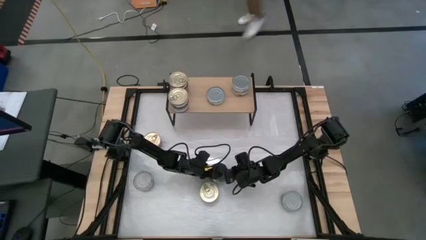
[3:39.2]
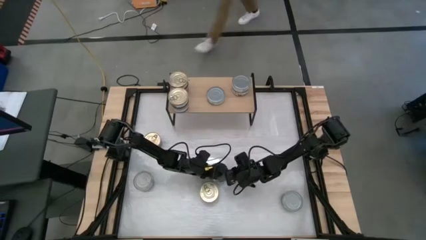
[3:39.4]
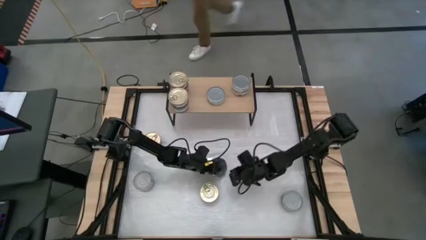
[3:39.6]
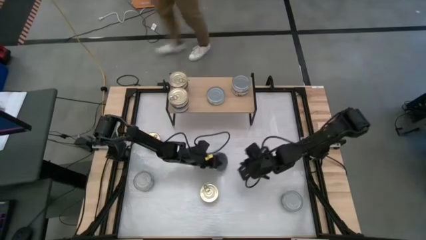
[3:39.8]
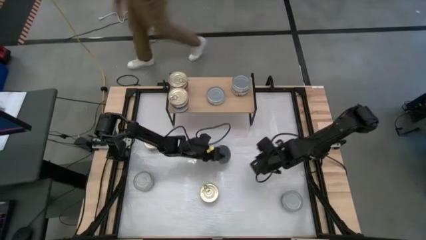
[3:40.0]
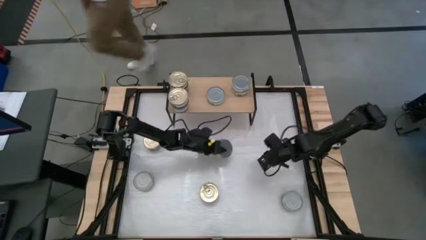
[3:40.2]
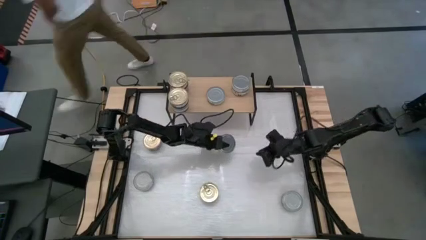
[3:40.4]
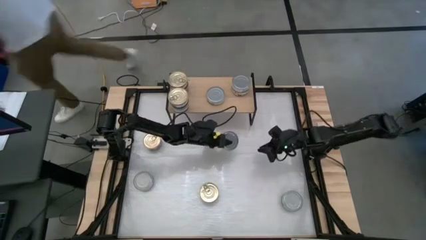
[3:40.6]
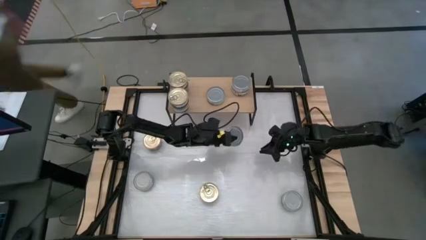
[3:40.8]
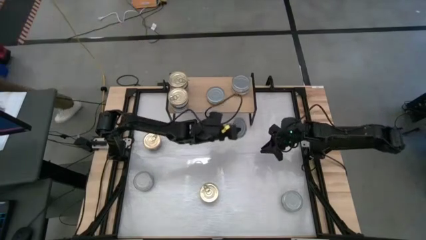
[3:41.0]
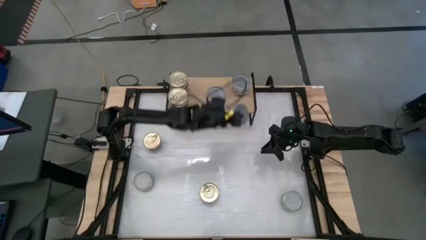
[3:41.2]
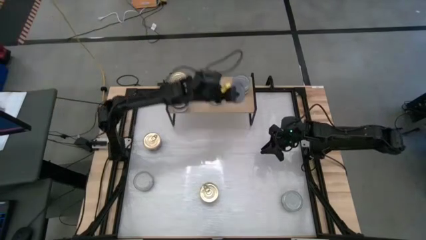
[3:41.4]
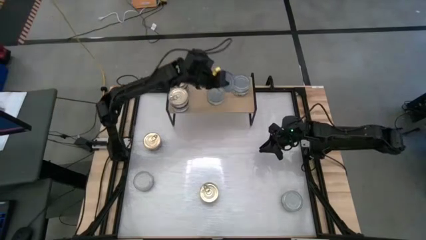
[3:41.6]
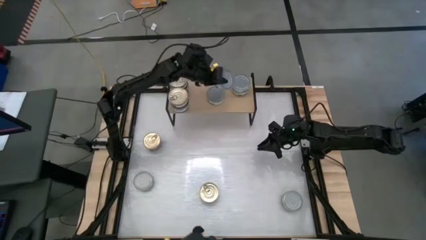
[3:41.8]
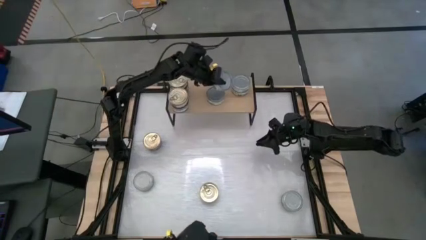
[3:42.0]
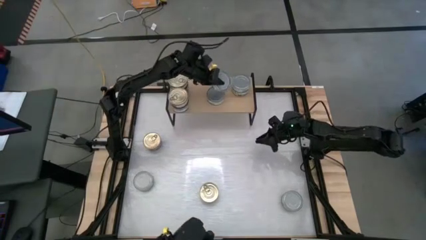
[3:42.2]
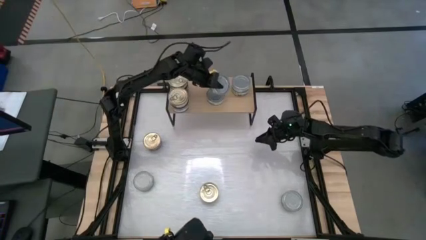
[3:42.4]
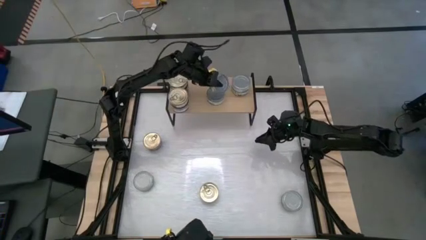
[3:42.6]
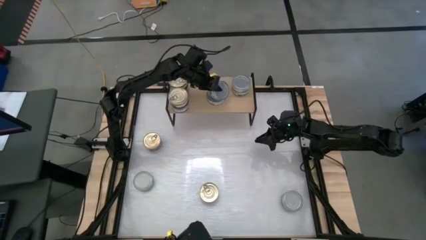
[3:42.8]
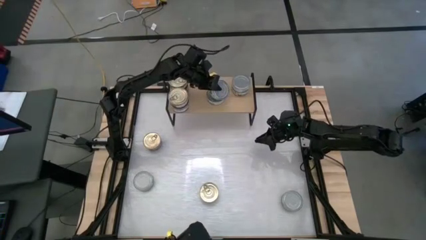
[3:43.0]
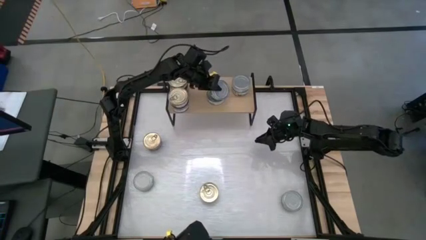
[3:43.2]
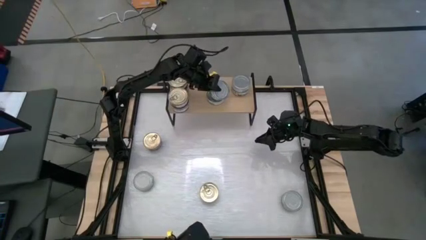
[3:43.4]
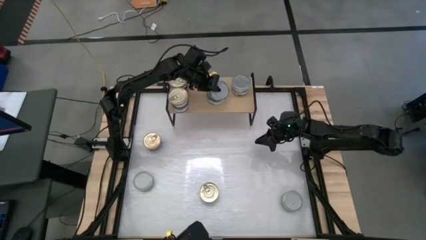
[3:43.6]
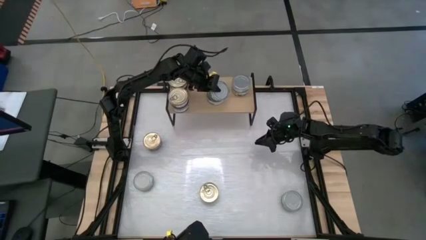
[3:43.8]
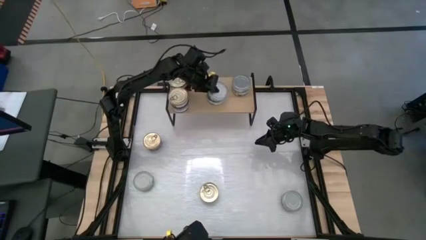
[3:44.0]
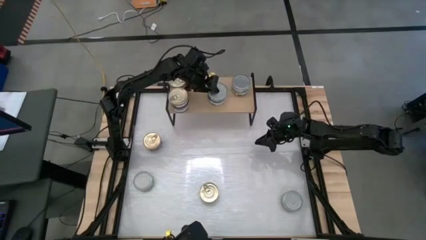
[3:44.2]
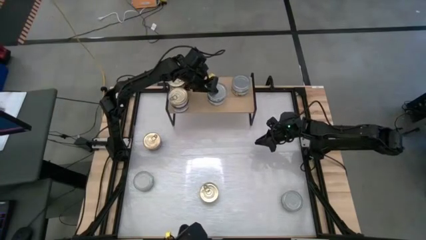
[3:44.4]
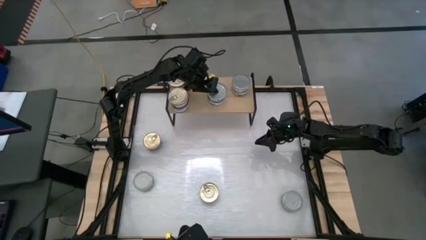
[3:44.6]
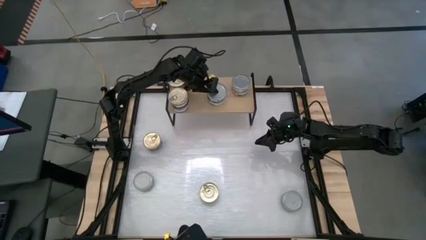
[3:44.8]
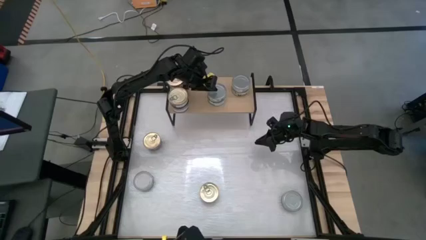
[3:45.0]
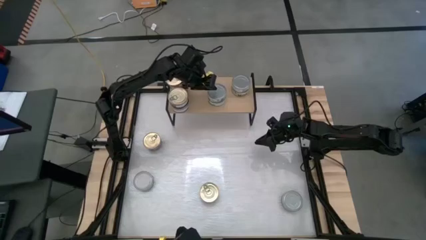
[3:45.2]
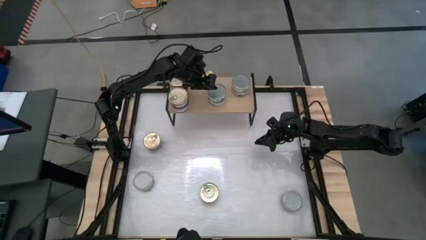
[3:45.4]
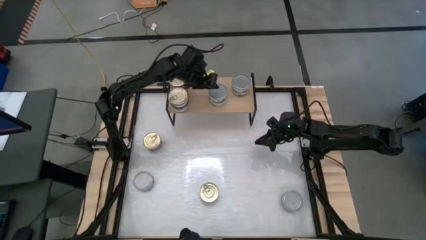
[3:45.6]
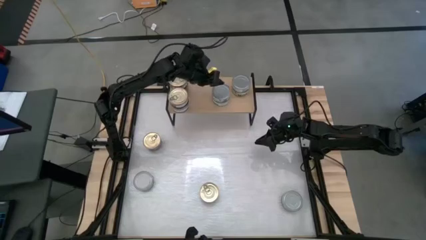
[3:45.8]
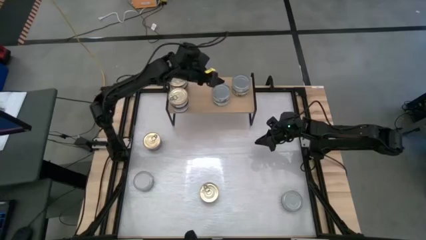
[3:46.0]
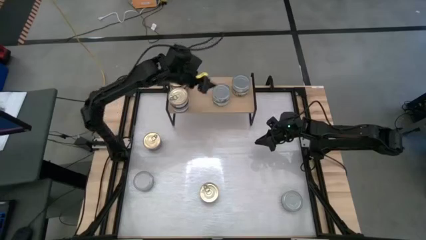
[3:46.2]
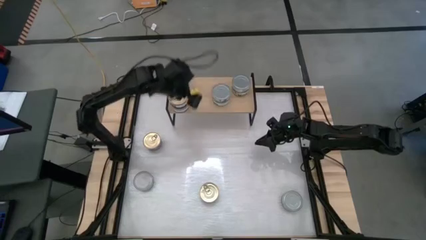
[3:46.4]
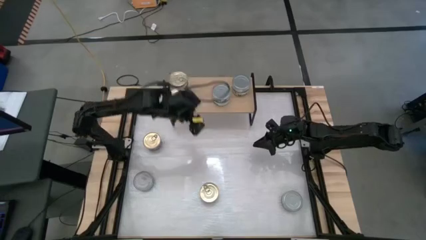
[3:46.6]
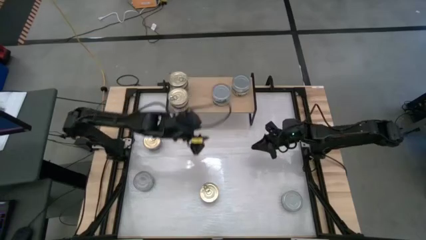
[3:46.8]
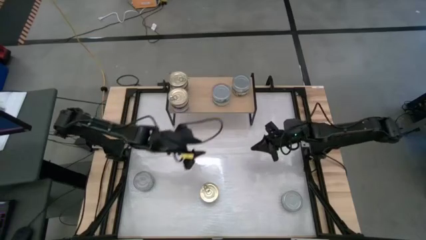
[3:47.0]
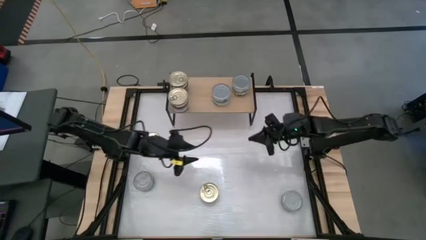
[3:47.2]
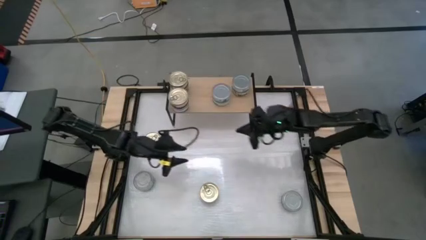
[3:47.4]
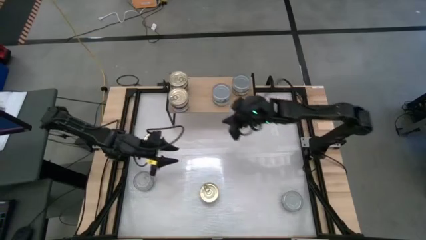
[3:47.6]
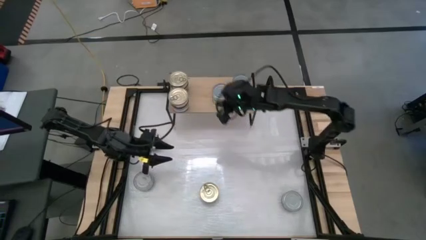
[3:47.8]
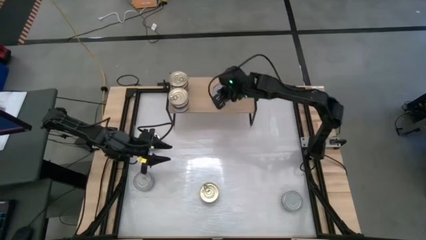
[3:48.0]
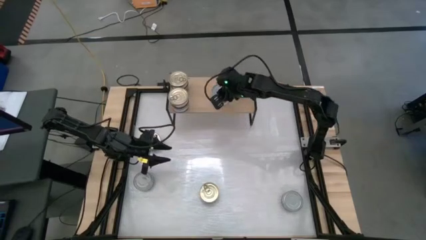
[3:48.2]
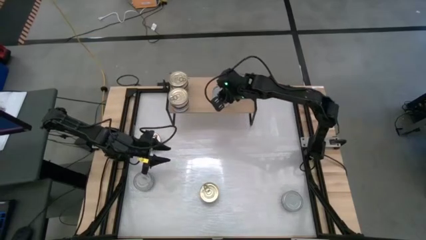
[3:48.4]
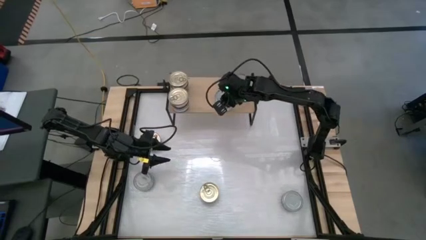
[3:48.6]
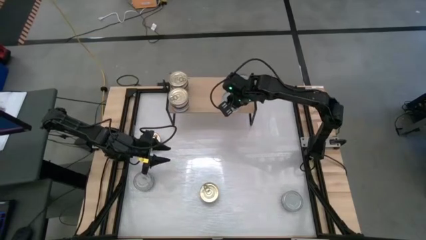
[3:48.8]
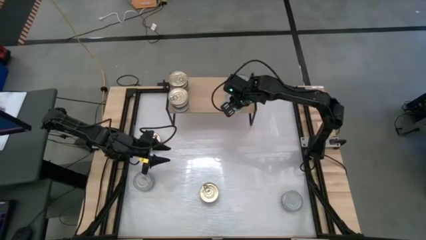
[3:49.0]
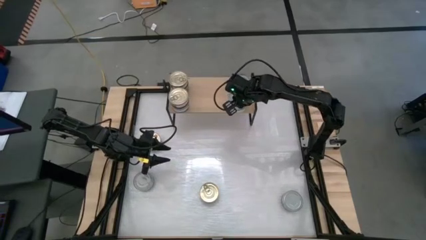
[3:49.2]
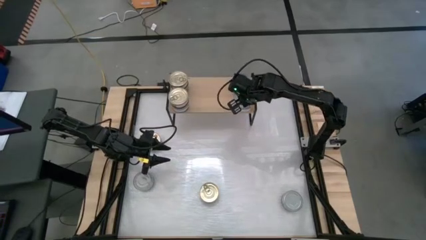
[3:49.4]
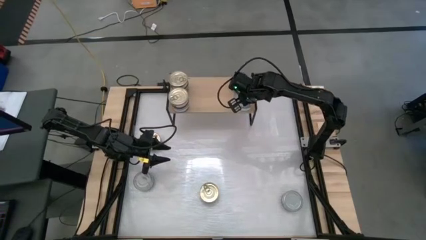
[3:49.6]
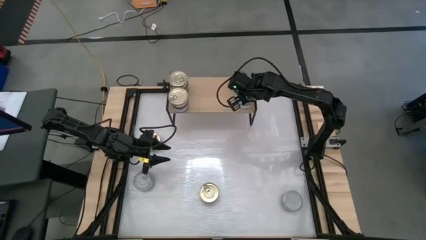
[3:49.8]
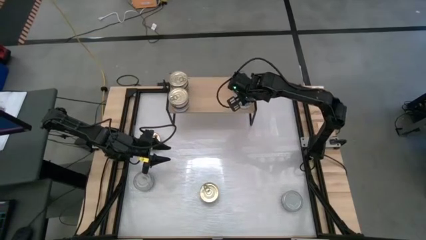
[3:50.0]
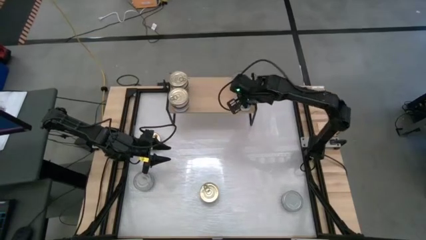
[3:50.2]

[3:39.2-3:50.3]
Task: Stack canned seafood by type on shelf
Stack the green and white tuna can on top of the other green and white tuna can on the shelf

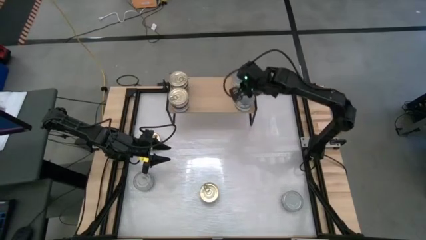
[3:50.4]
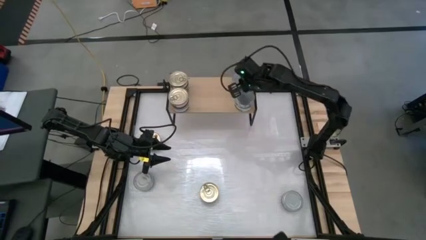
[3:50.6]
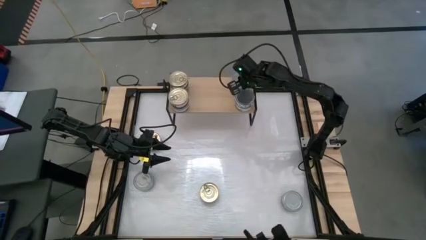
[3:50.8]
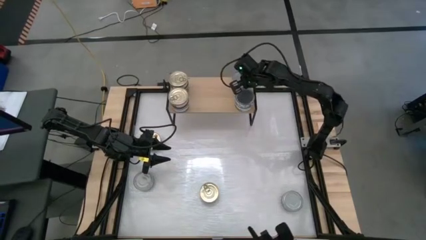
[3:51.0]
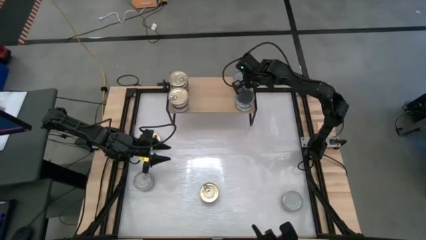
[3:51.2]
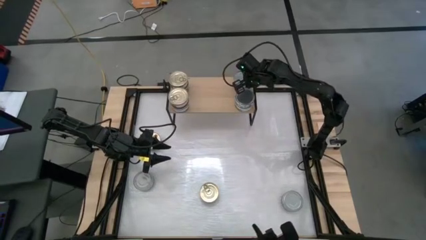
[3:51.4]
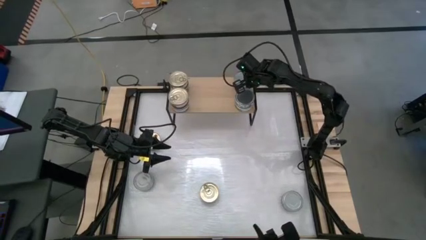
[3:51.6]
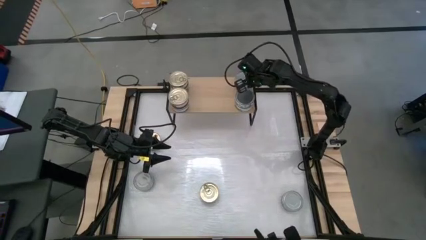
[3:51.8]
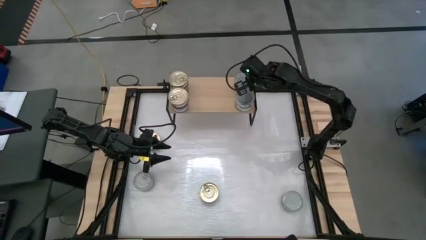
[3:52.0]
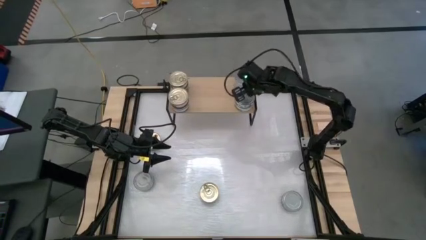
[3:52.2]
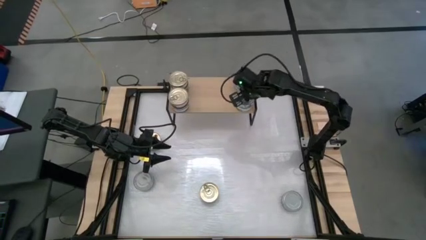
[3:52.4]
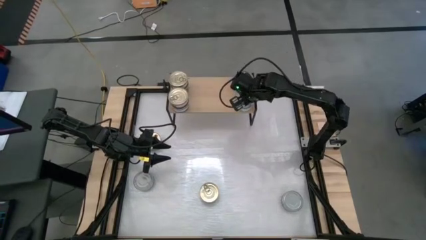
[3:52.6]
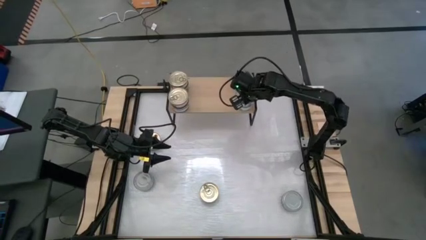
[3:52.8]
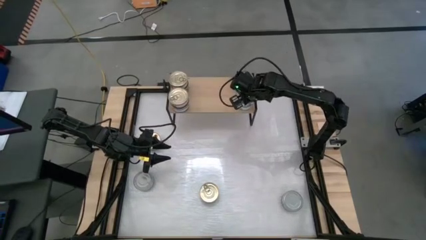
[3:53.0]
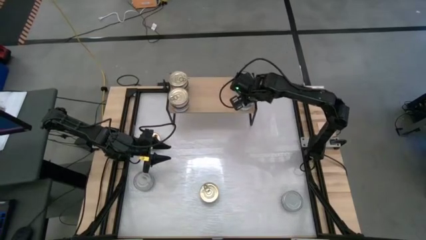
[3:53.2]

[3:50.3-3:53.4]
Adjust the stacked green white tuna cans on the shelf

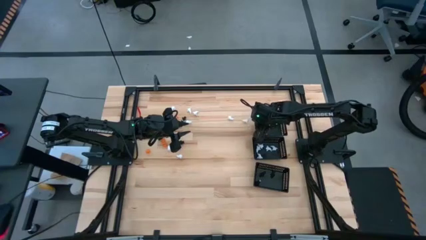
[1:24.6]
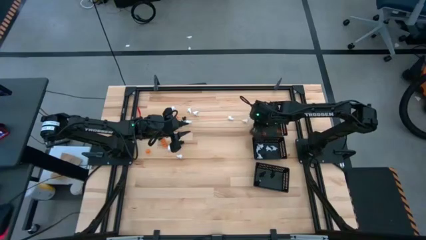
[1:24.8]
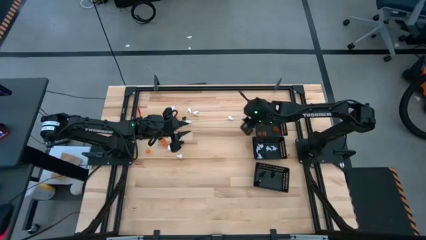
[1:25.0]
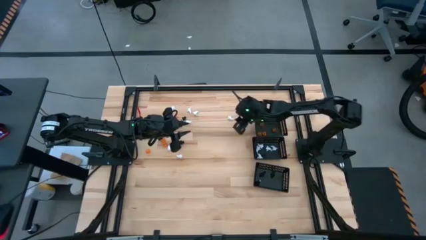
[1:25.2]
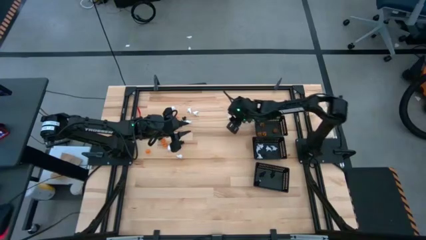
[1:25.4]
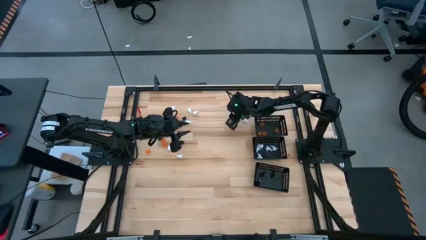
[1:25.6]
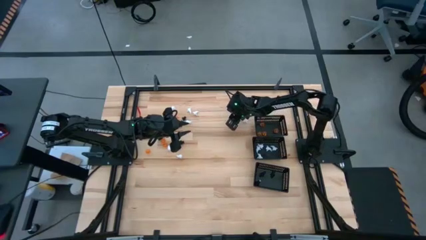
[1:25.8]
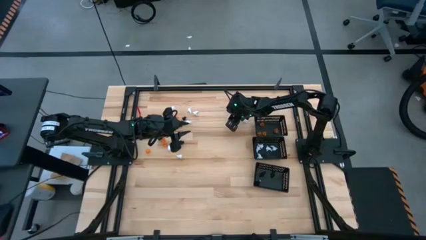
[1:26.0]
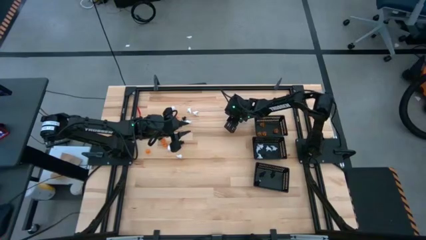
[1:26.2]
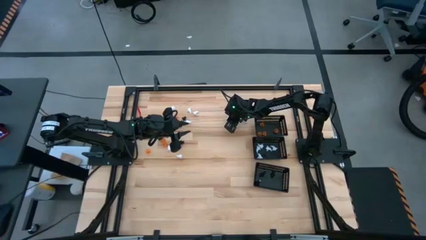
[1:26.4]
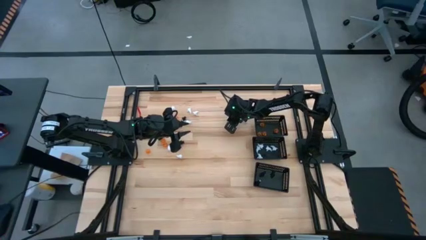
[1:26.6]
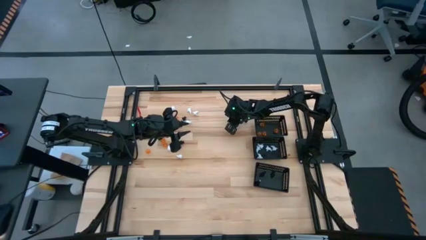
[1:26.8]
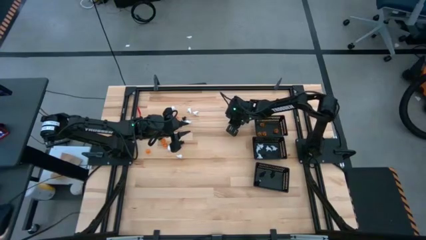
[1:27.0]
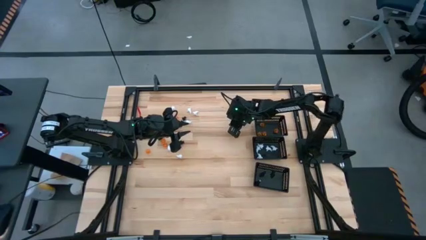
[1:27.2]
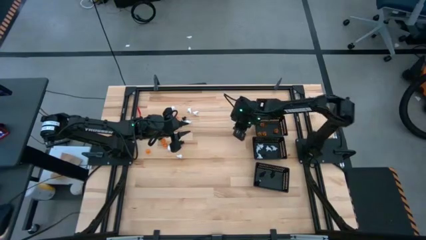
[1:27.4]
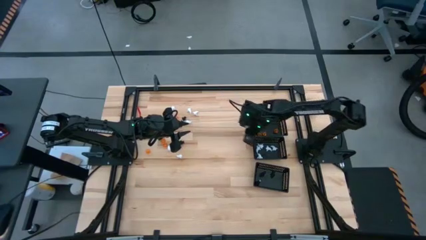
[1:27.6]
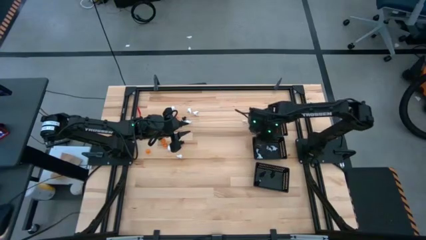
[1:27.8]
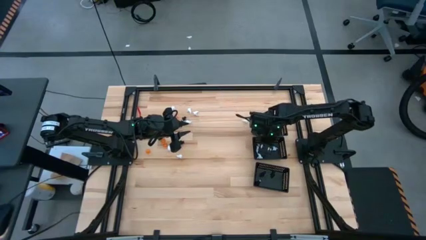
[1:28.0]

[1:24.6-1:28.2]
Task: Sort Halloween decoration
Put the white ghost toy into the center black bin
